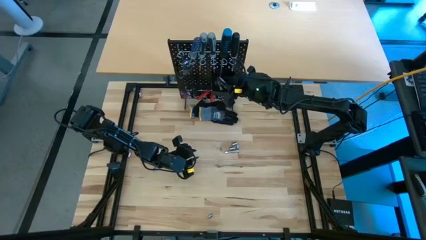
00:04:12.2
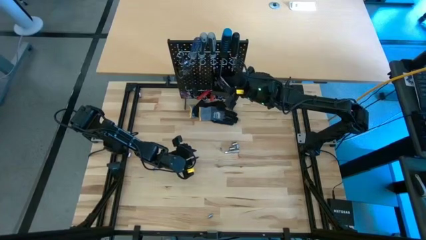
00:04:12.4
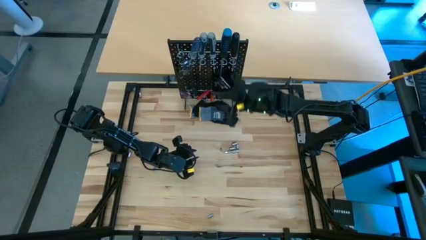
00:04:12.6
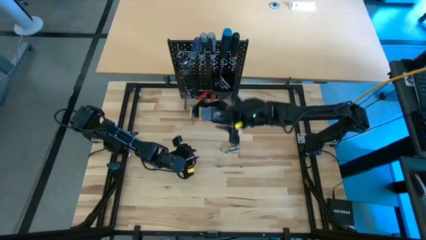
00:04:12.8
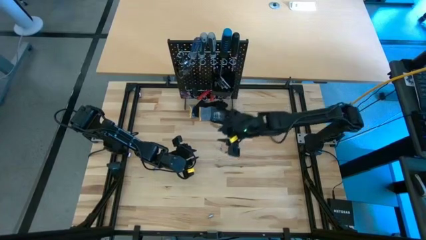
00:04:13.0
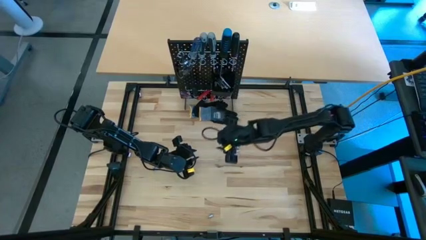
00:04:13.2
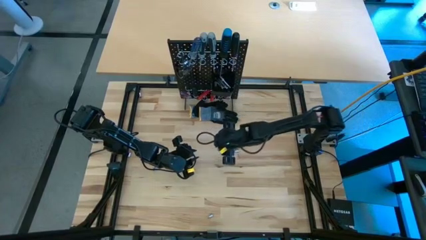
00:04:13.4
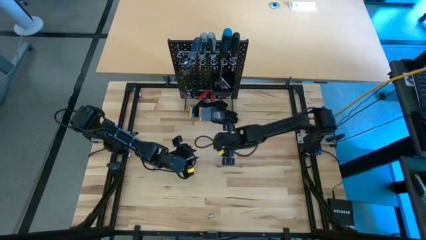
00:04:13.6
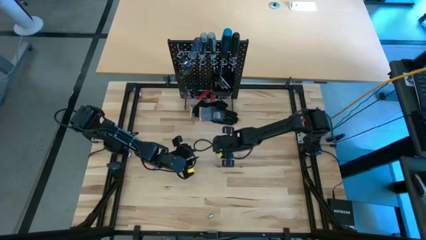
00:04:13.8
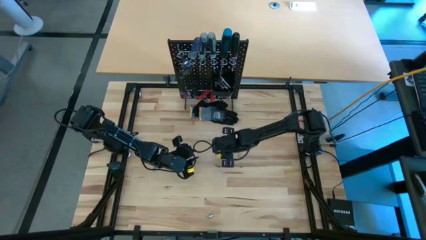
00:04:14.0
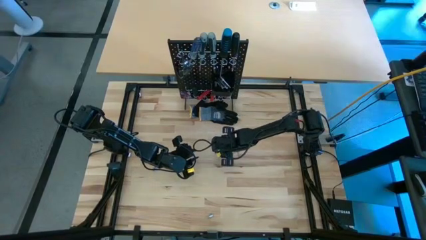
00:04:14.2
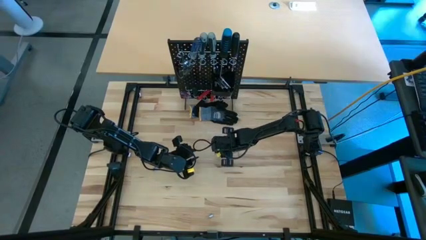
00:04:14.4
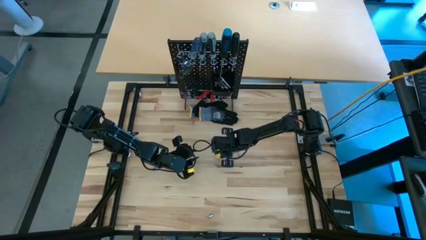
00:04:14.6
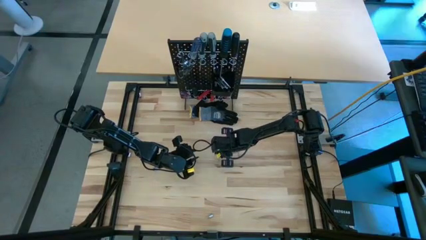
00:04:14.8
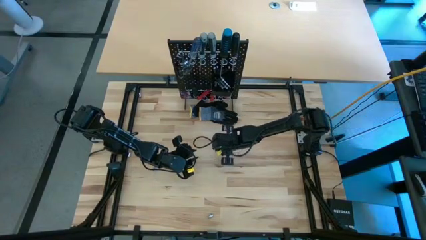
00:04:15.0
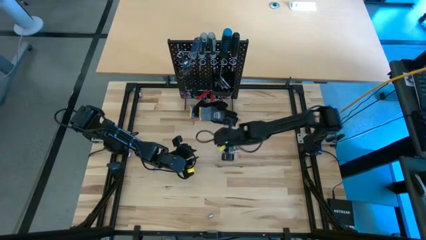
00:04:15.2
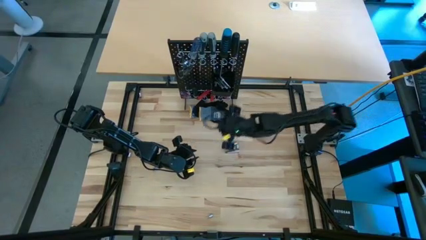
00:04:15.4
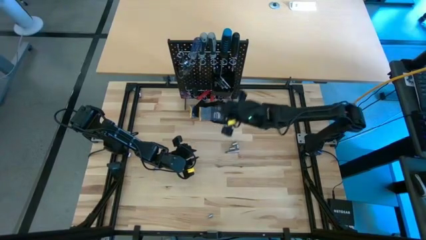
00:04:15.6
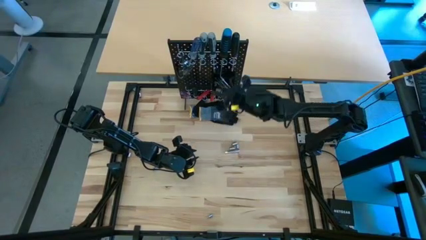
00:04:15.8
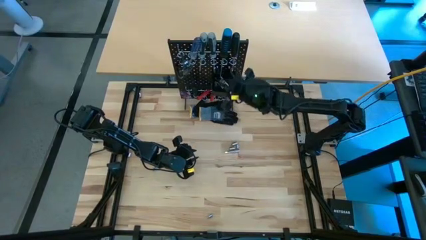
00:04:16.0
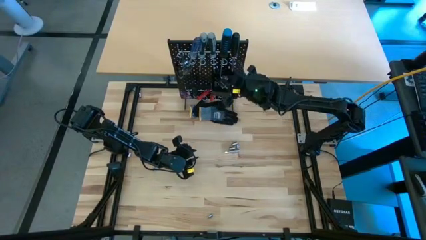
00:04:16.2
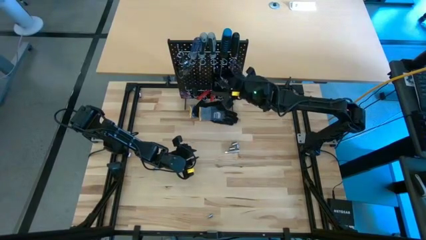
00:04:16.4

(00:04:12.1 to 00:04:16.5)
Task: Hang tools onto peg board
Put the socket into the pegboard bin

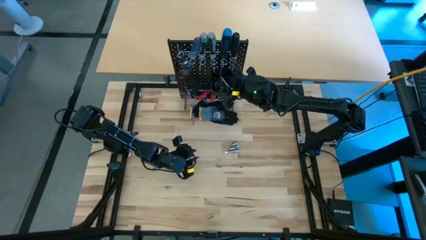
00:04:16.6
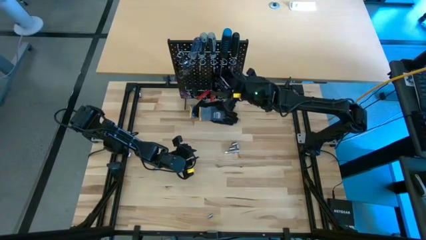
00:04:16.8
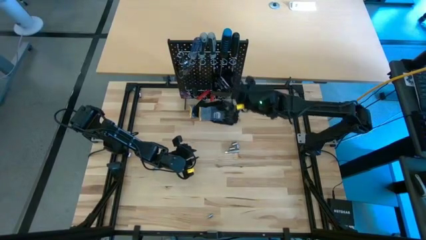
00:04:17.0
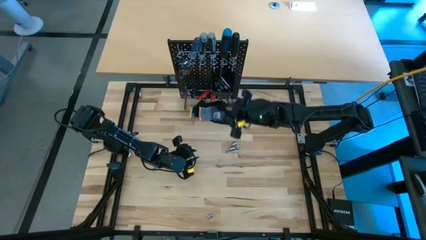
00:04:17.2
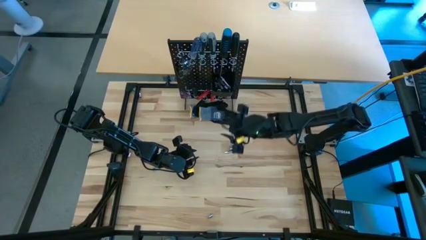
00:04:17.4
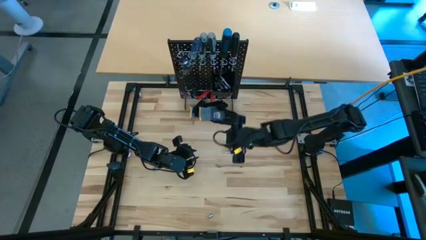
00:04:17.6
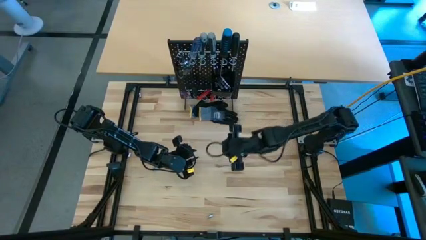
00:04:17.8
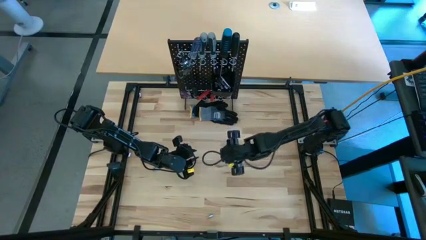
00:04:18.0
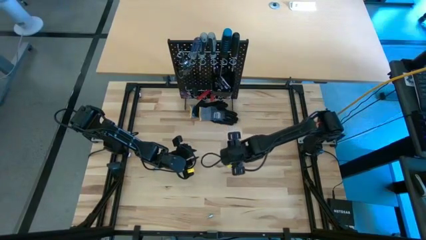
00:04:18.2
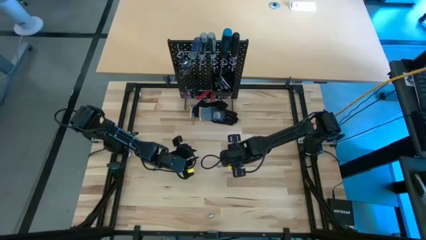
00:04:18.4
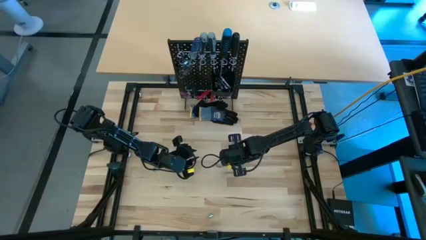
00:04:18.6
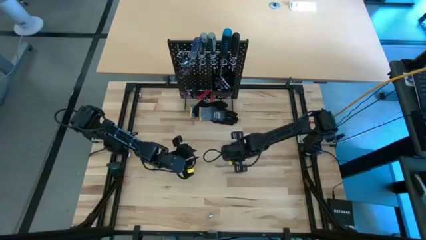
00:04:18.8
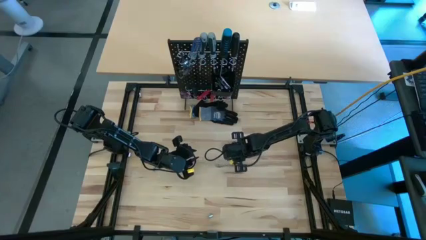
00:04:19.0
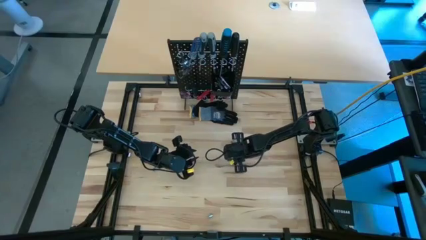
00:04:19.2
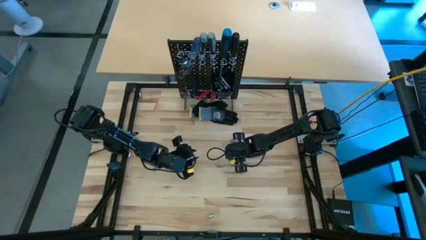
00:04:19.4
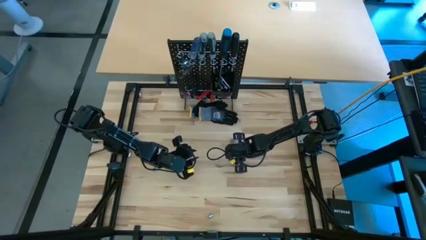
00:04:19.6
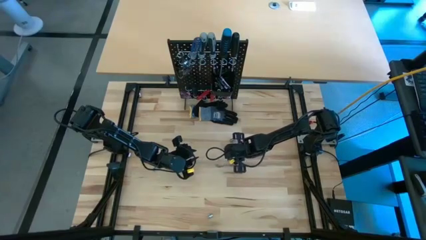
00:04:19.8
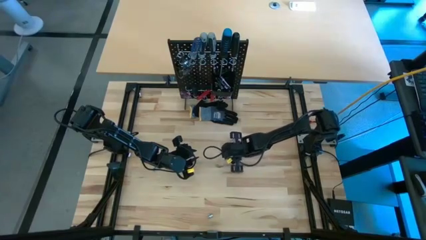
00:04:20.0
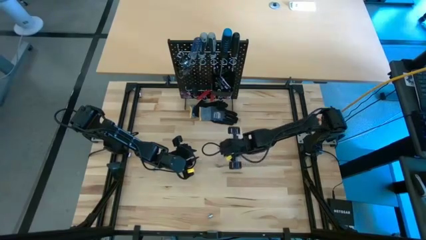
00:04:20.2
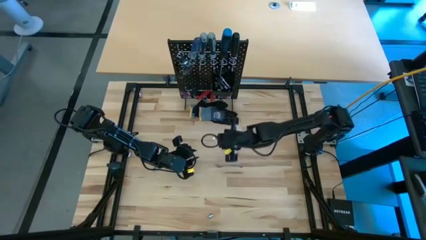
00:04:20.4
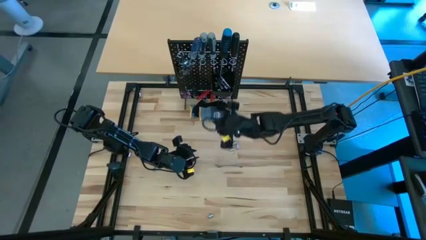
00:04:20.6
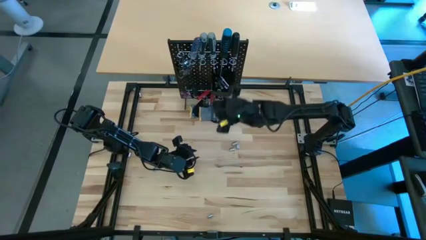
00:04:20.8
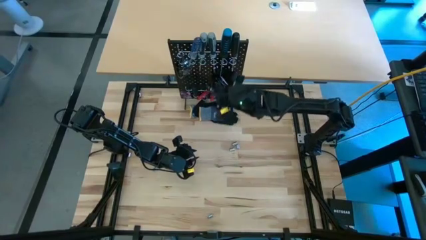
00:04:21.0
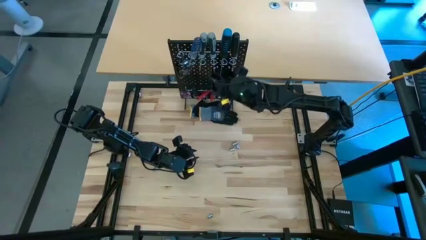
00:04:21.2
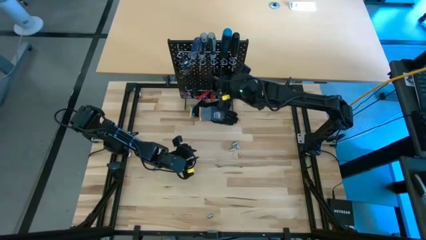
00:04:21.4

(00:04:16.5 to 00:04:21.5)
Put the extension bar into the pegboard bin

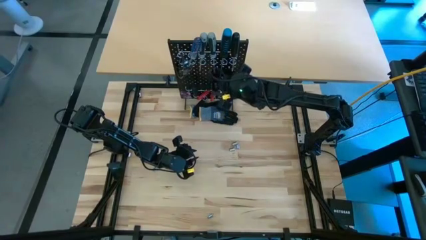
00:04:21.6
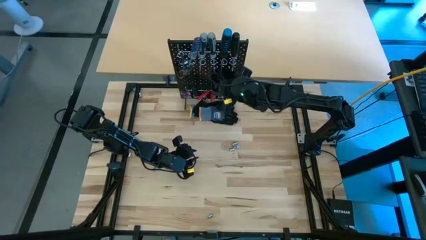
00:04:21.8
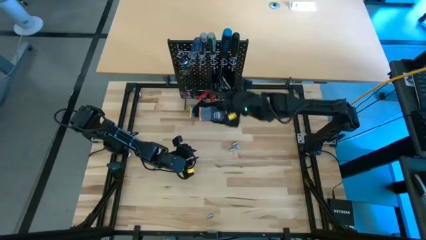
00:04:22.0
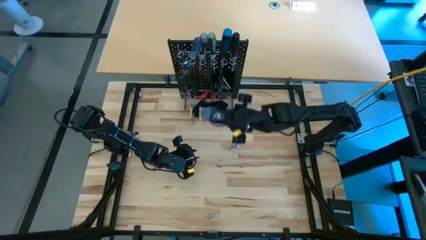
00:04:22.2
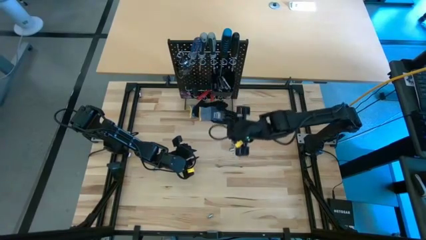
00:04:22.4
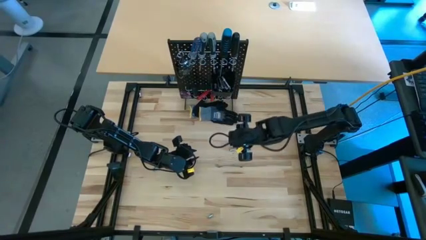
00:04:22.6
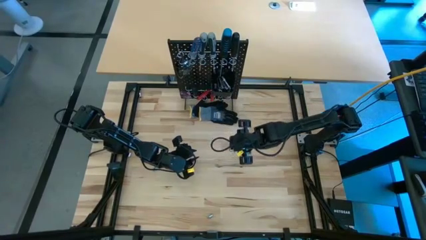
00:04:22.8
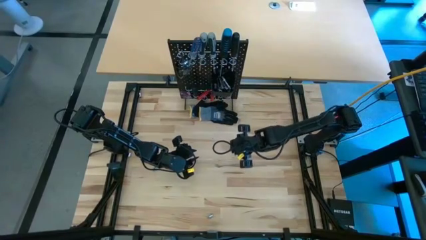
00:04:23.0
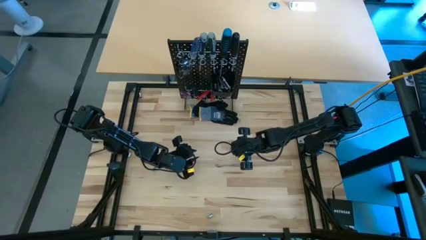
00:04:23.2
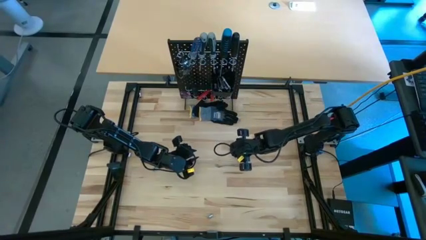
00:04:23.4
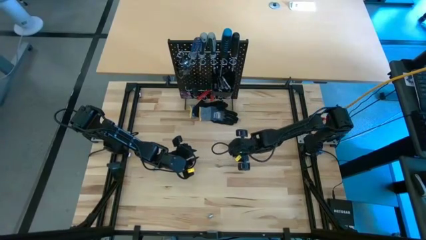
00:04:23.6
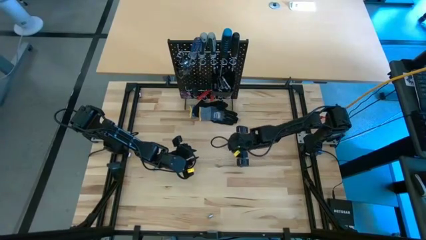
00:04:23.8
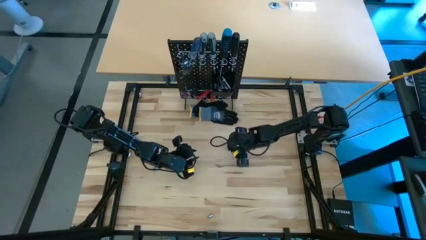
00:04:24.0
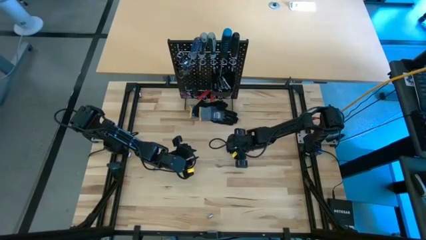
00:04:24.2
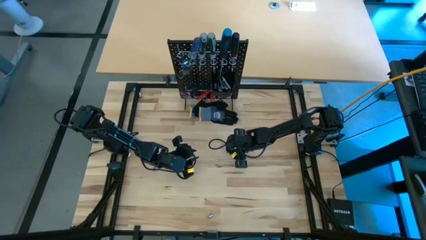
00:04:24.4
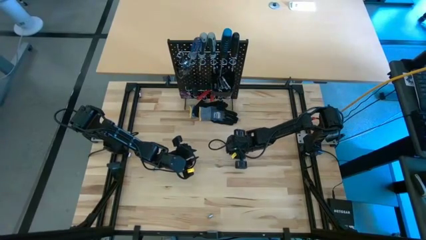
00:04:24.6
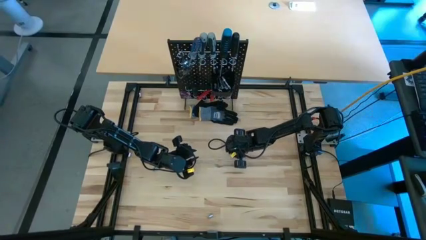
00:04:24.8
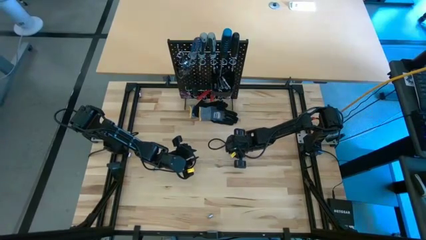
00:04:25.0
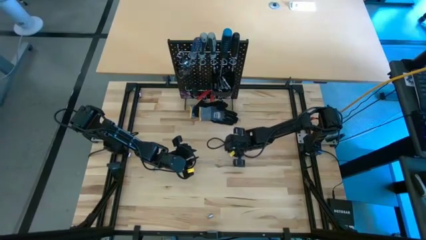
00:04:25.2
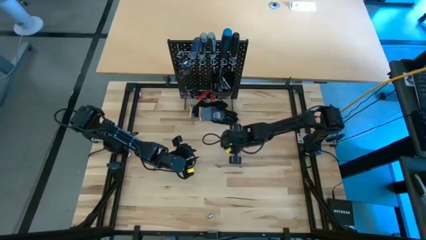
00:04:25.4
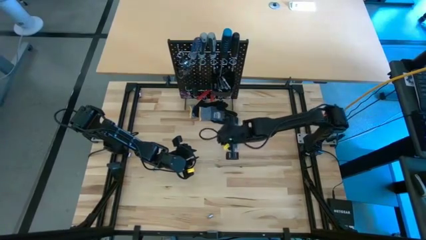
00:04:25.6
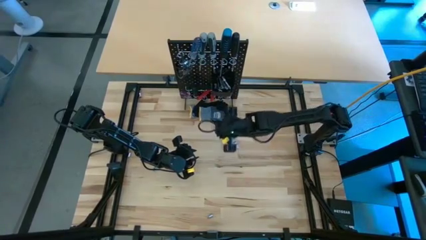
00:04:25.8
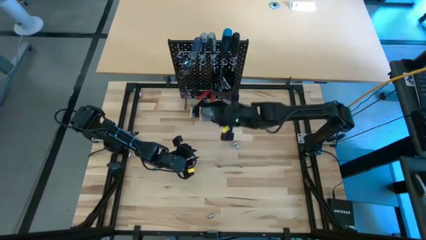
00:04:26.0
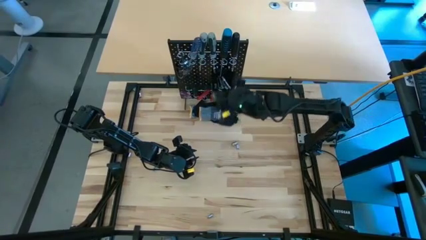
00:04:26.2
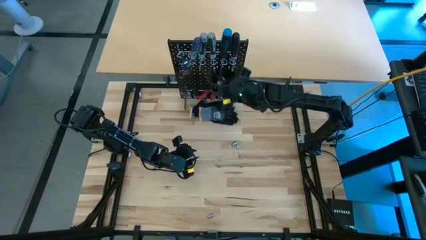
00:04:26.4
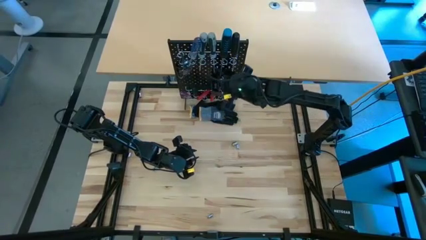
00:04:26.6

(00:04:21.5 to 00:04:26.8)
Put the socket into the pegboard bin

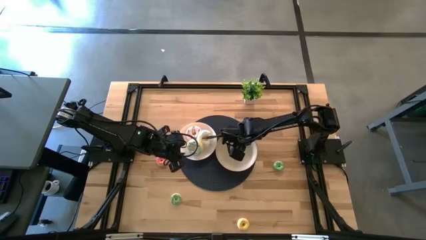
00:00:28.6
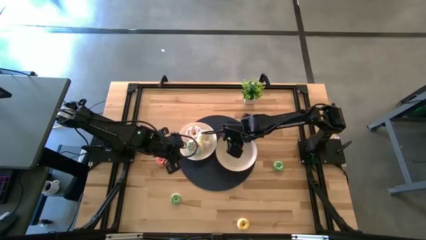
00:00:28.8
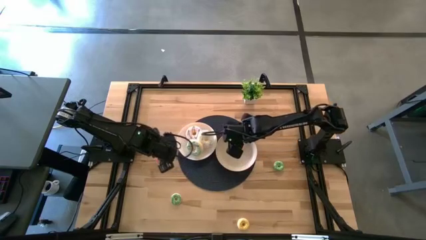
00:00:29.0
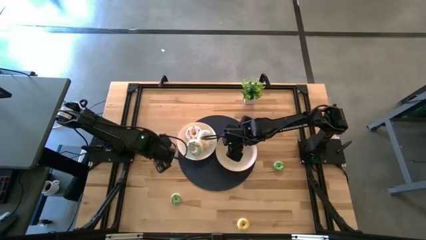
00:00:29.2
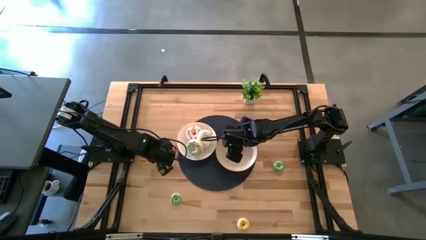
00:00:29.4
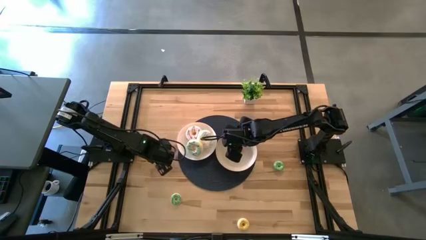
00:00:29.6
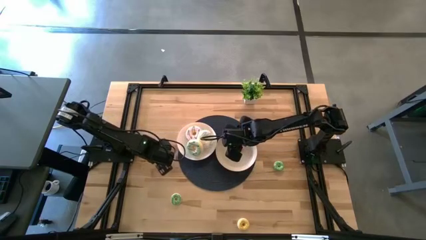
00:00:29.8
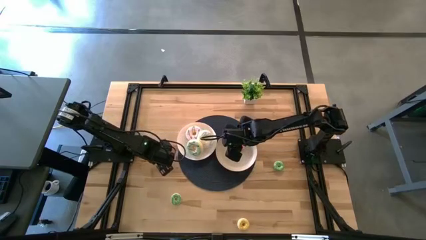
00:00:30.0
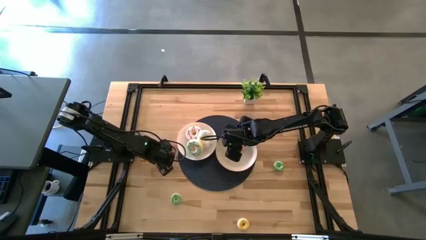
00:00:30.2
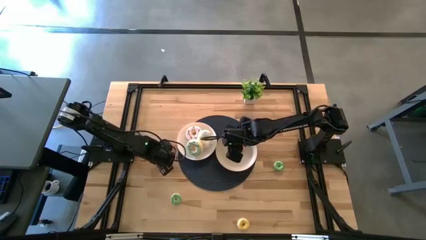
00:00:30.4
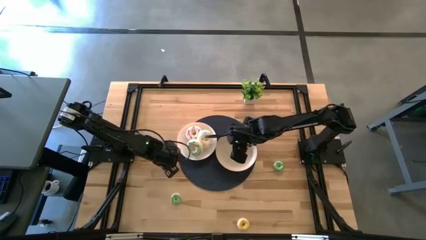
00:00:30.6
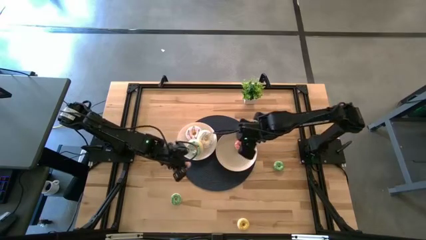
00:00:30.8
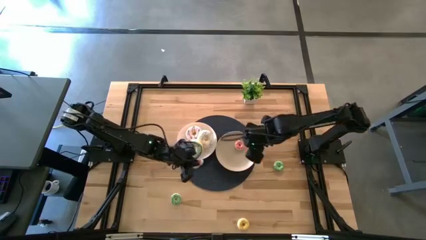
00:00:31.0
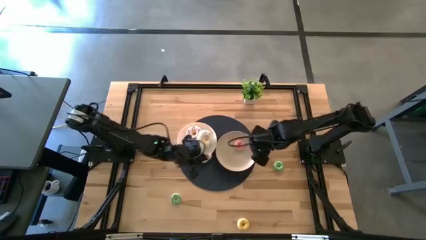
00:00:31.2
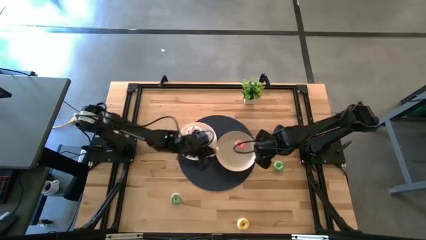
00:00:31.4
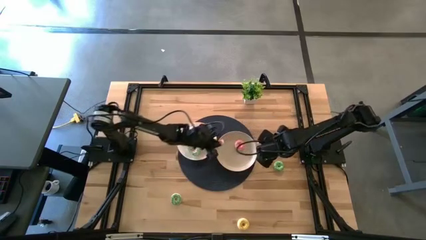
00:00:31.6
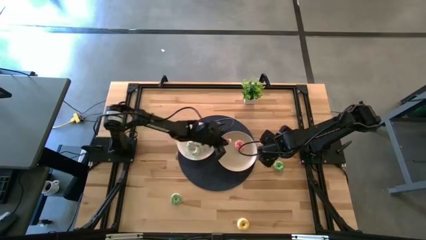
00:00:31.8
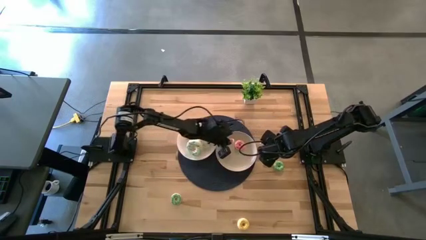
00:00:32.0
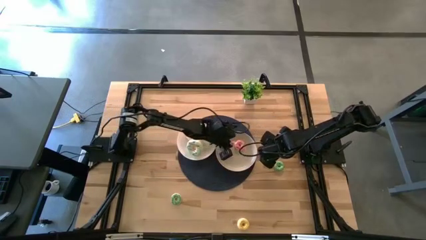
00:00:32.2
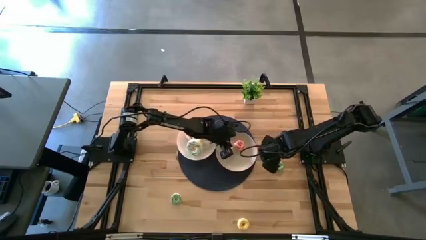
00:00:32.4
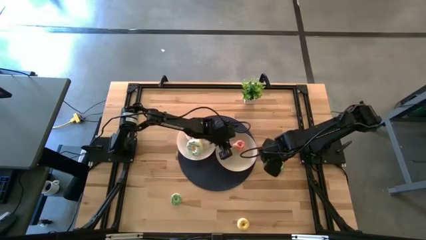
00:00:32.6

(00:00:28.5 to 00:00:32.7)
Task: Pick & Place donuts
Put the small pink donut on the light brown plate
